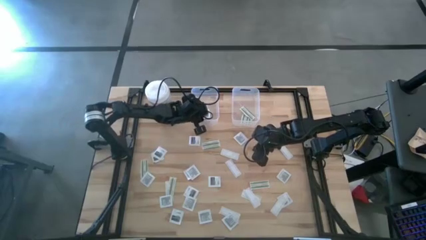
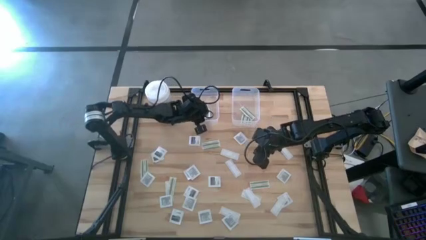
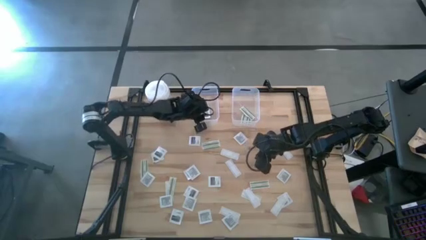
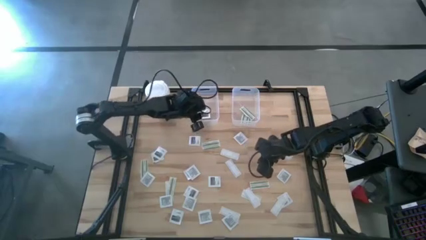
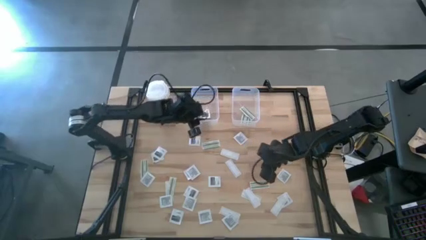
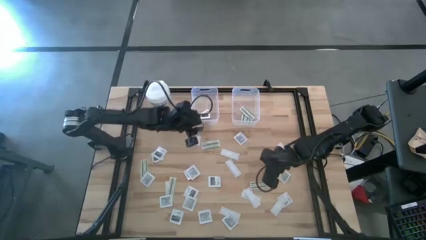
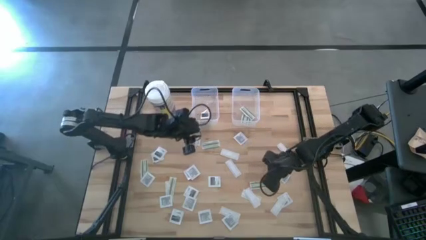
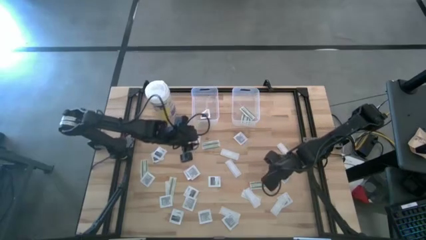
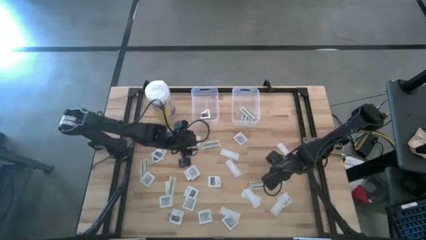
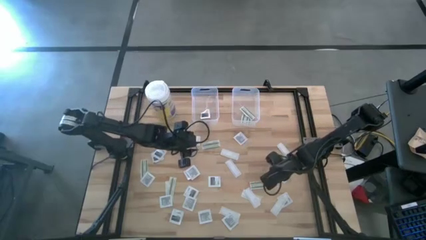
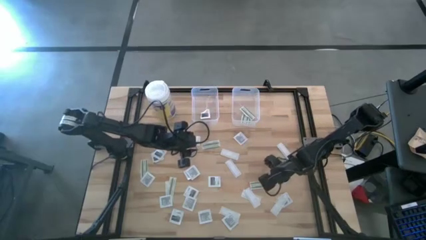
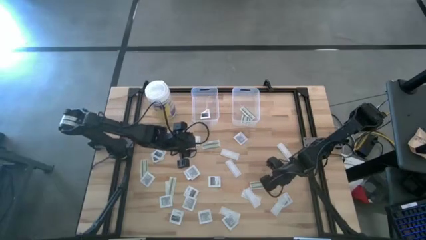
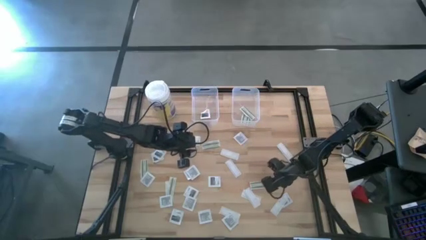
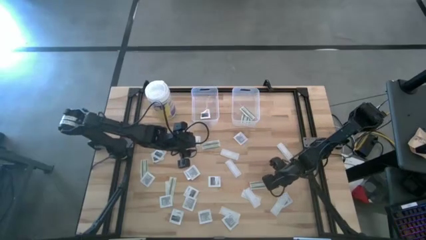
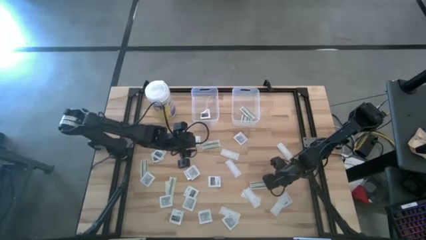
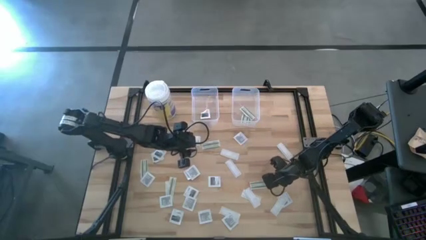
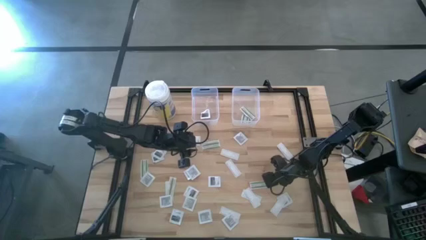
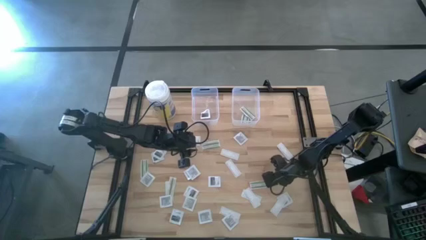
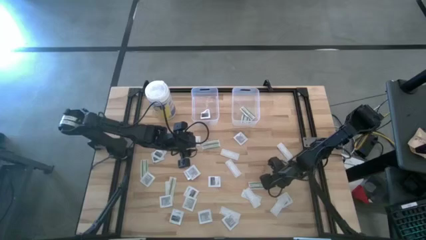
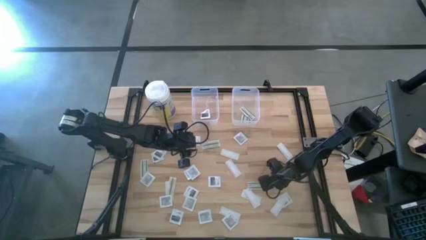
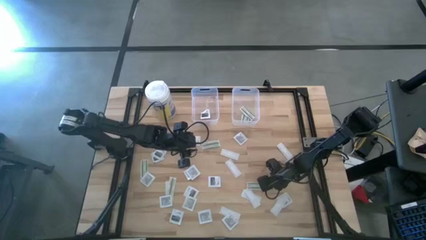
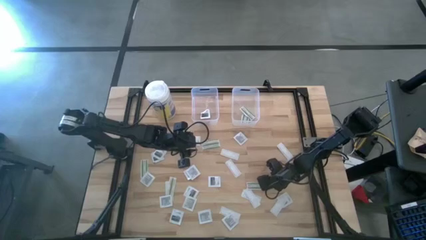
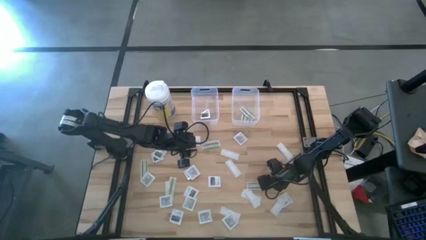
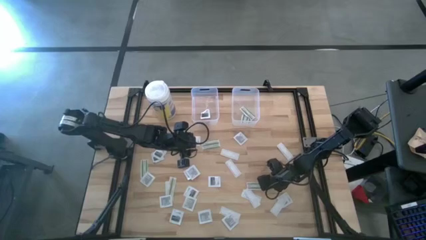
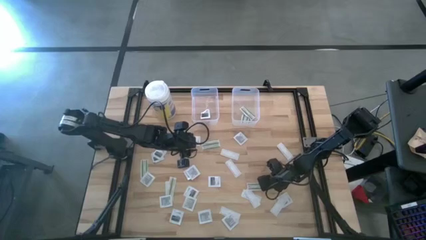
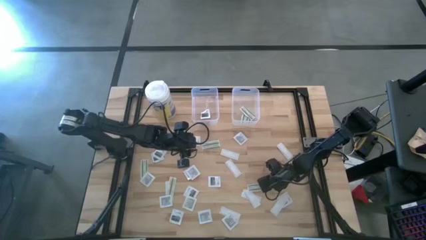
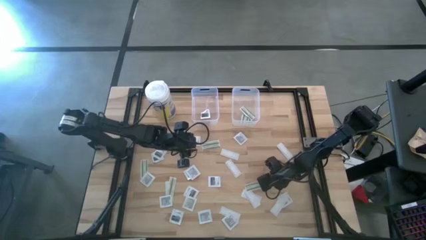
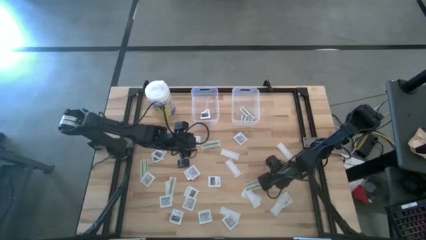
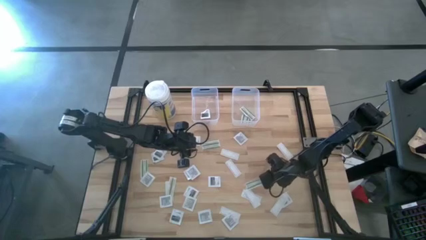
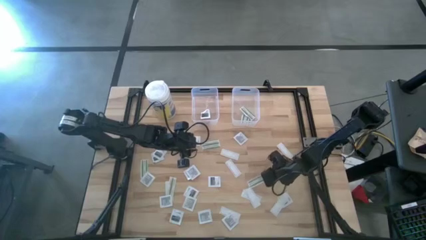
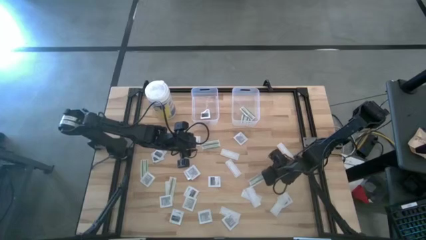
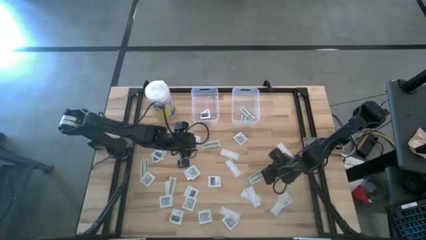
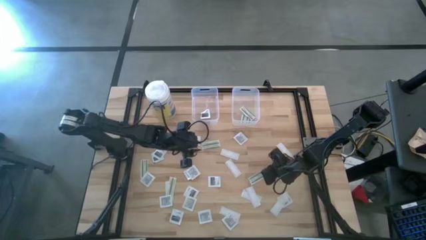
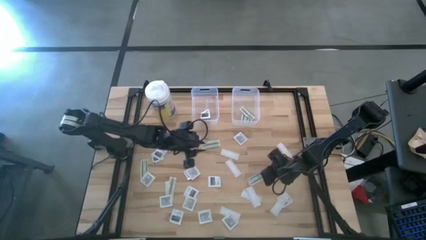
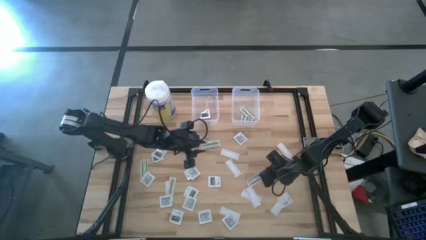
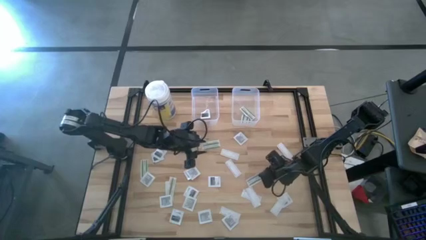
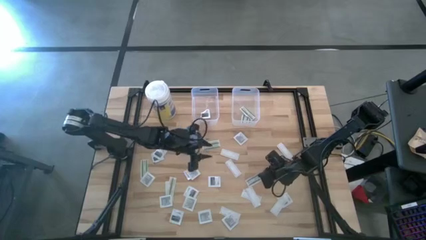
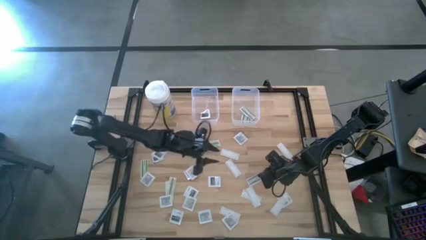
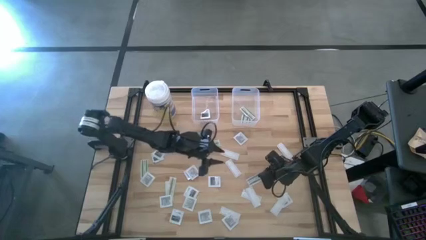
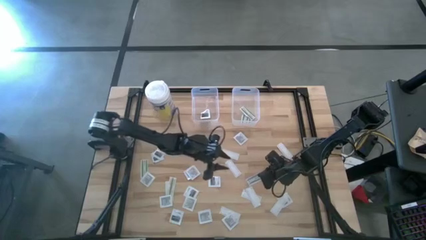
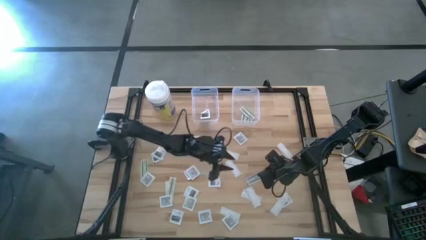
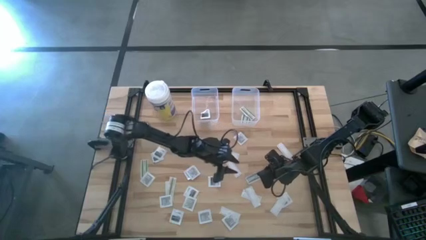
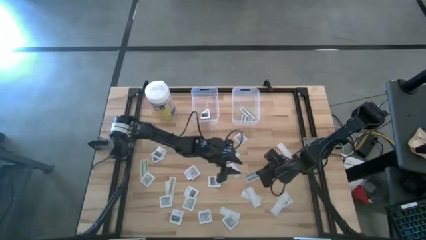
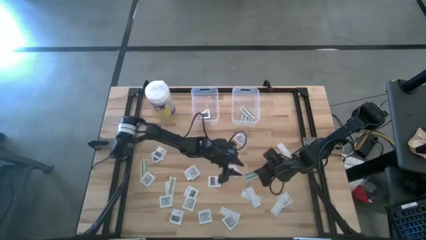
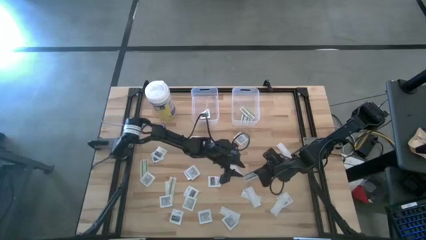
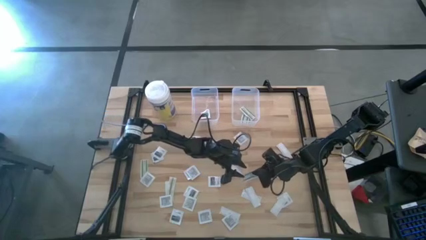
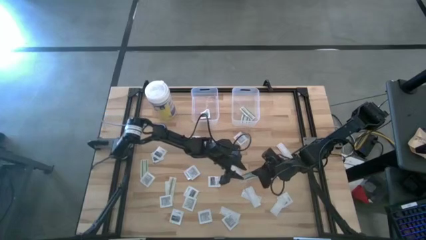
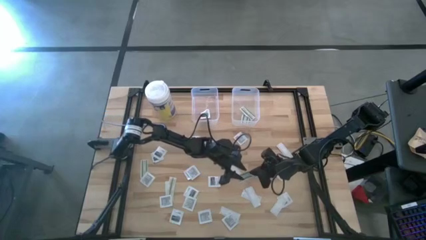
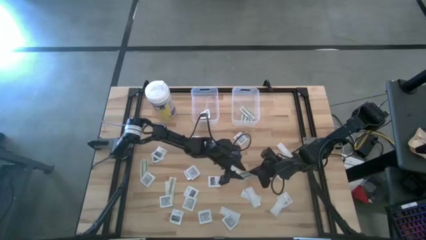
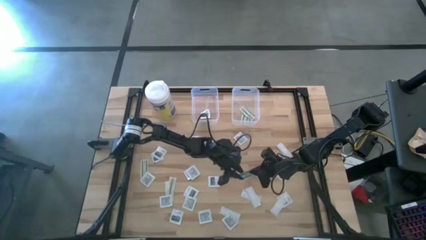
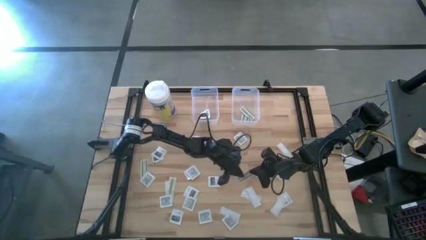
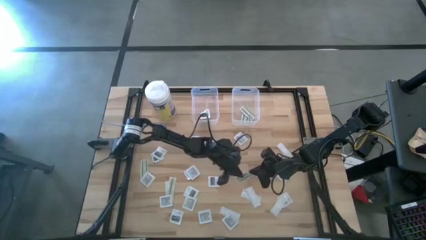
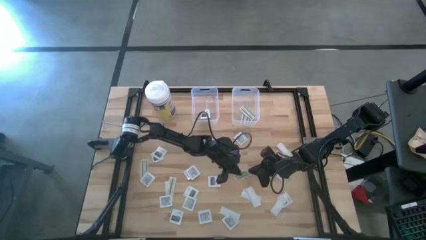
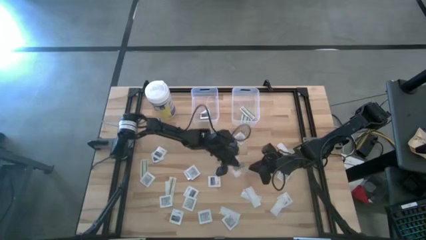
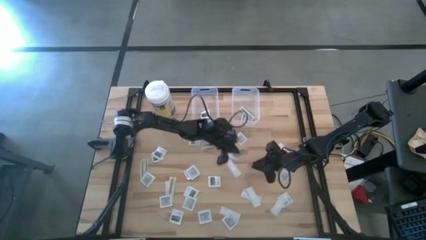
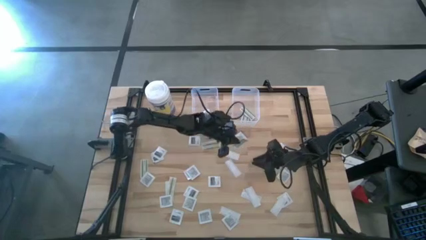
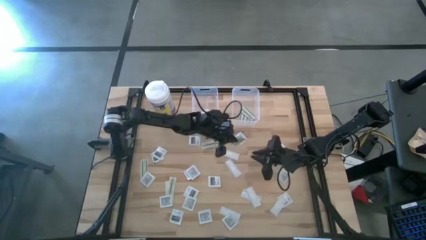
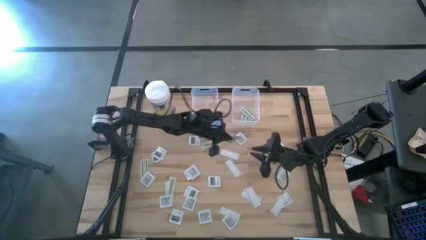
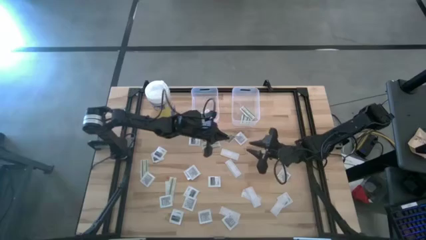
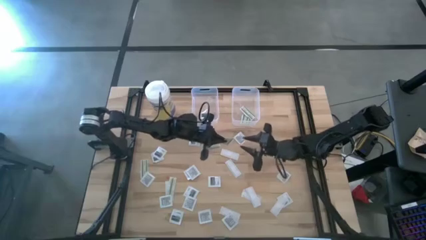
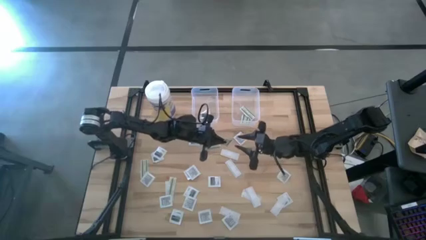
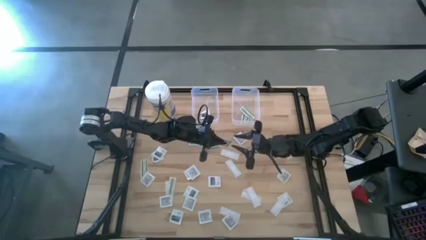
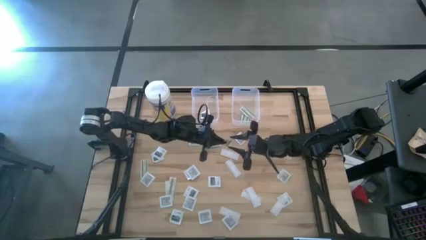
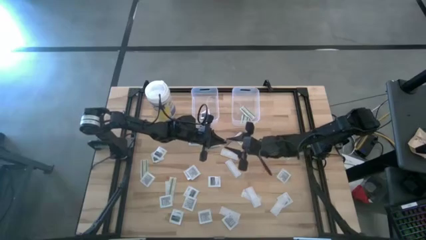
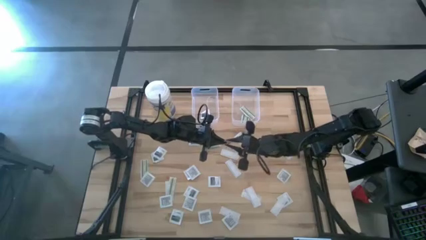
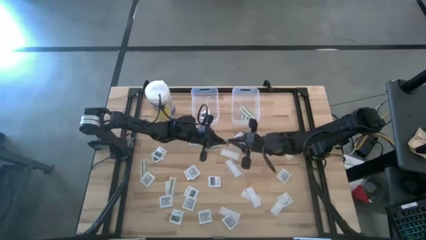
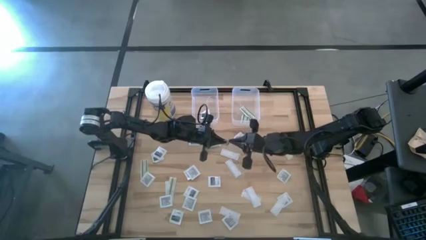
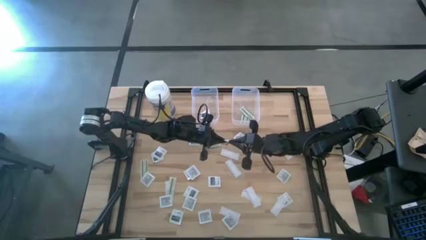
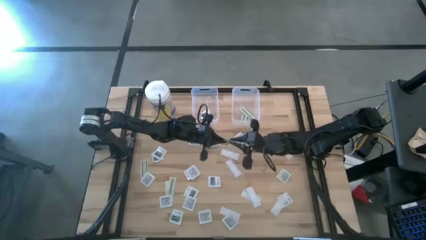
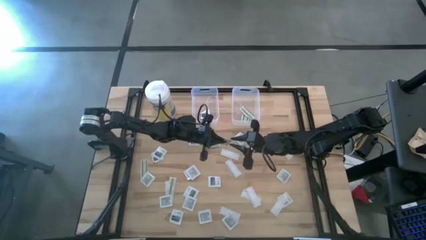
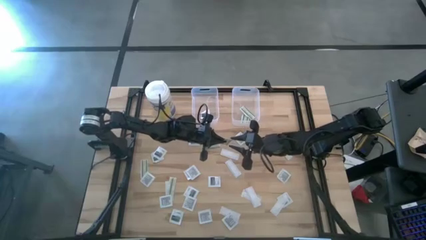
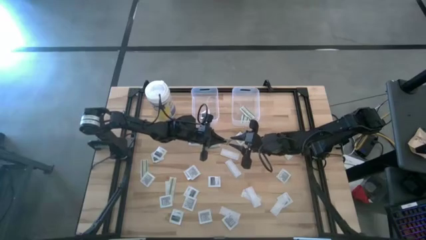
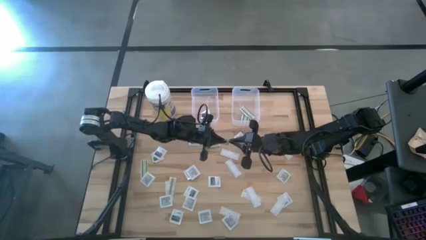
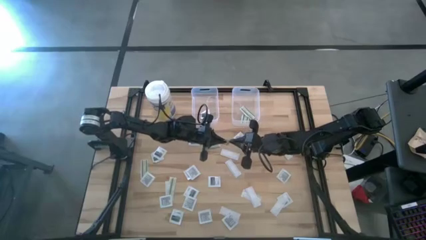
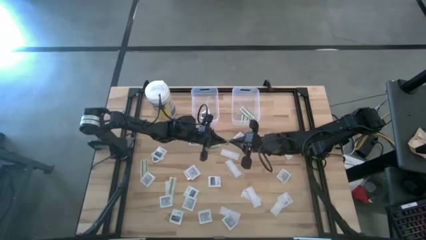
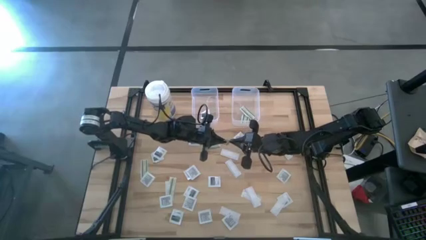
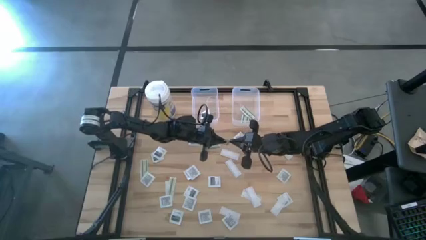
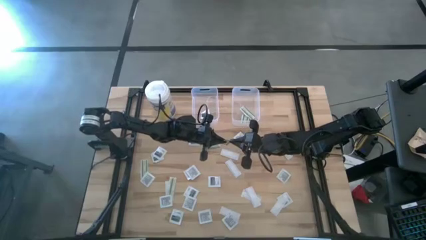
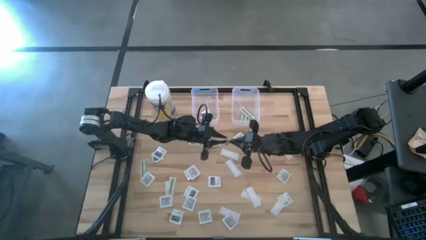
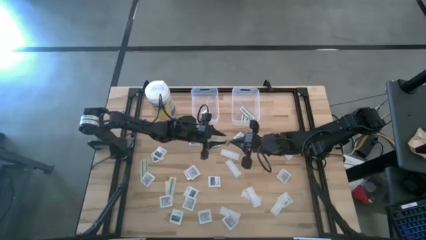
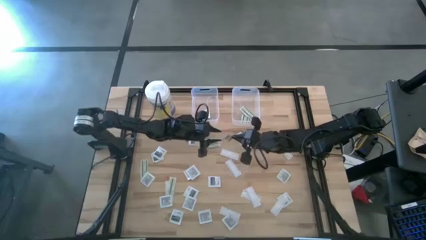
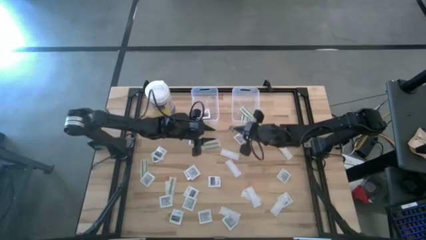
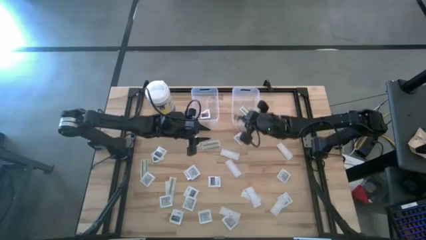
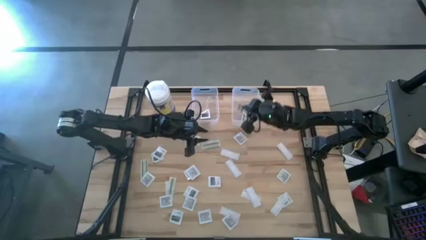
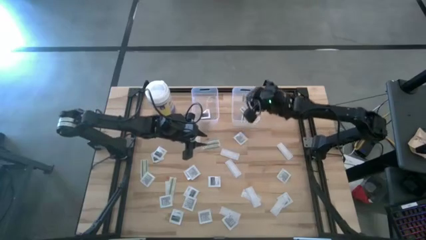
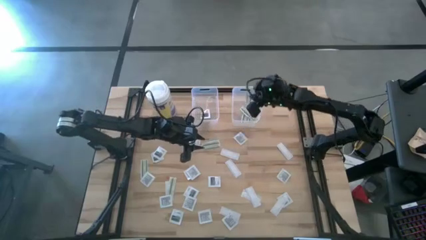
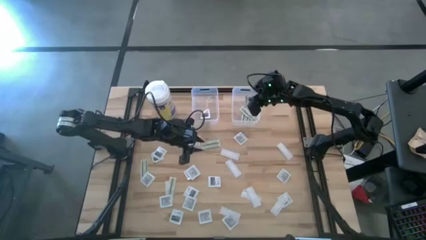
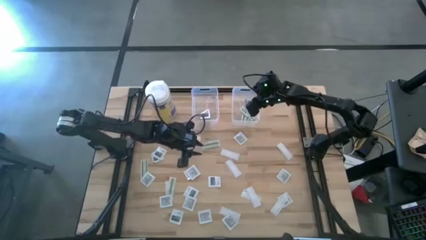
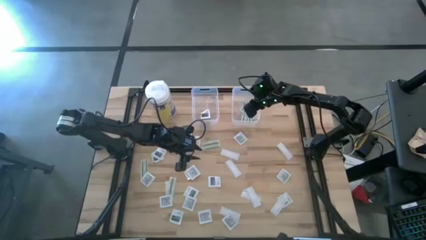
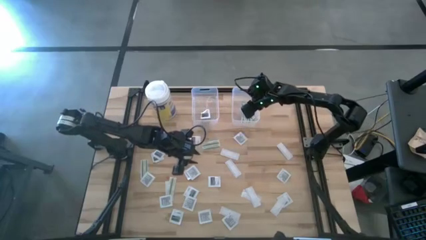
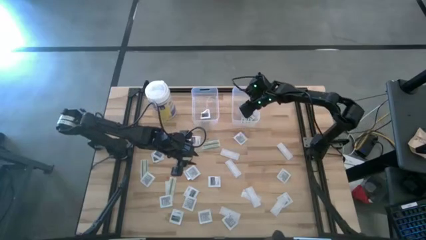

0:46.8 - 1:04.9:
Task: Pick & Place First Aid Supplies
Put the bandage into the right transparent bin
